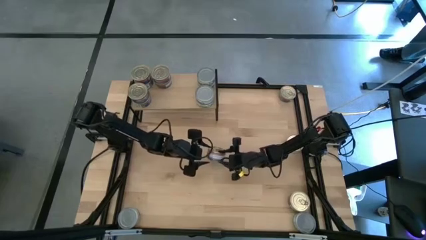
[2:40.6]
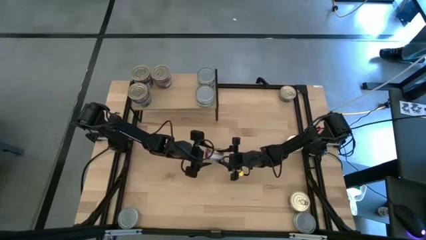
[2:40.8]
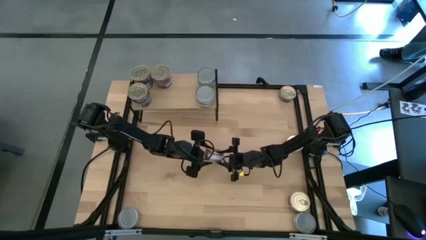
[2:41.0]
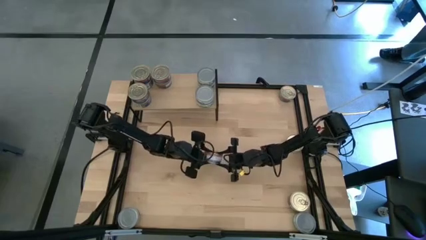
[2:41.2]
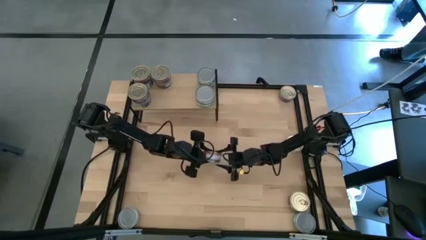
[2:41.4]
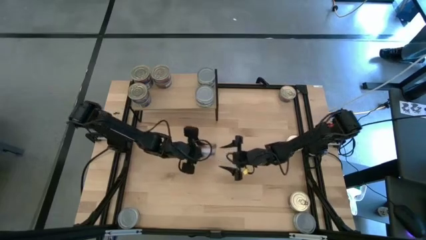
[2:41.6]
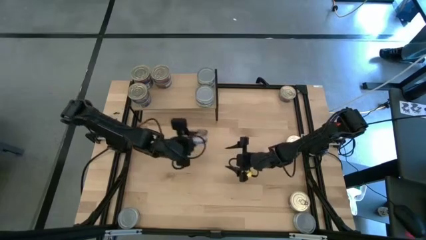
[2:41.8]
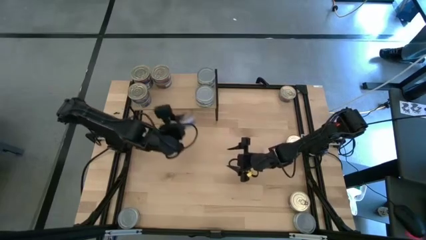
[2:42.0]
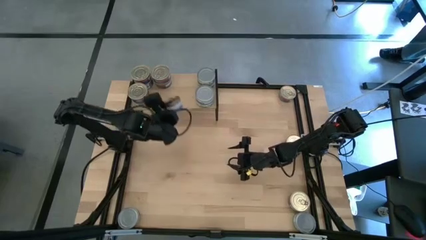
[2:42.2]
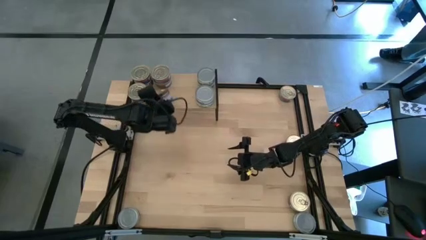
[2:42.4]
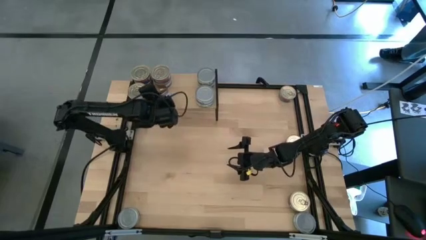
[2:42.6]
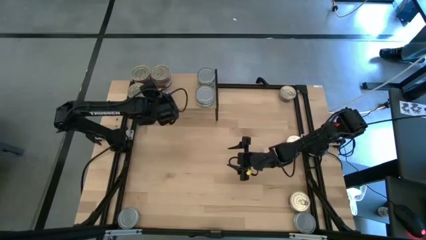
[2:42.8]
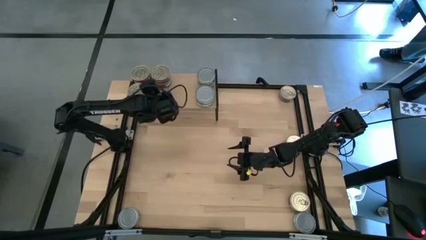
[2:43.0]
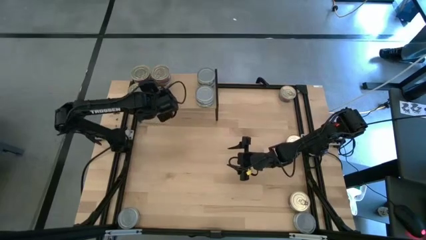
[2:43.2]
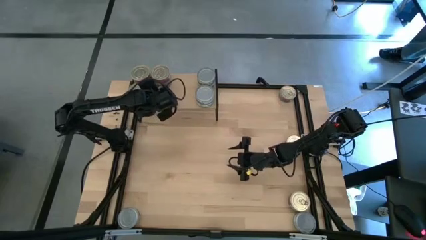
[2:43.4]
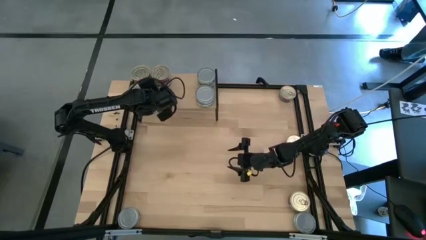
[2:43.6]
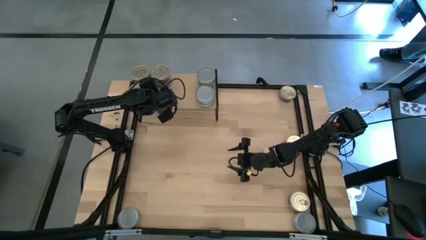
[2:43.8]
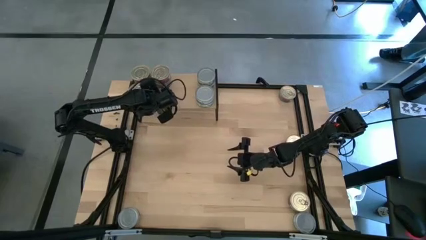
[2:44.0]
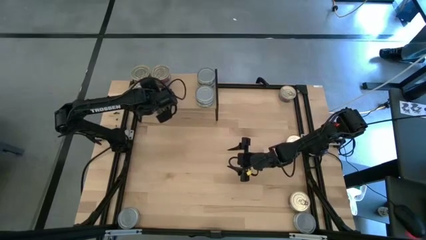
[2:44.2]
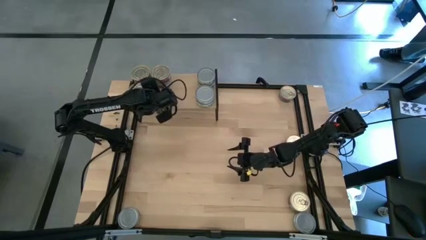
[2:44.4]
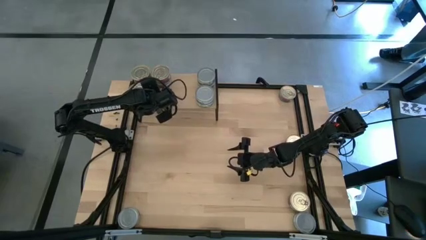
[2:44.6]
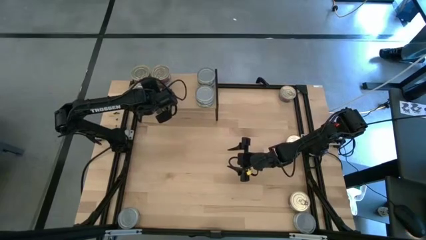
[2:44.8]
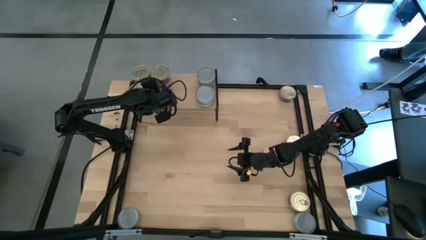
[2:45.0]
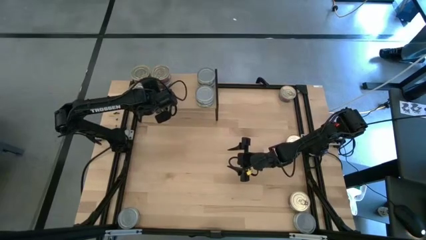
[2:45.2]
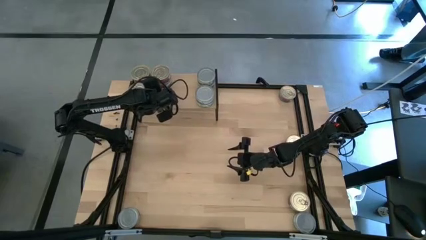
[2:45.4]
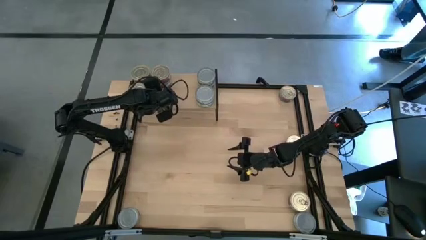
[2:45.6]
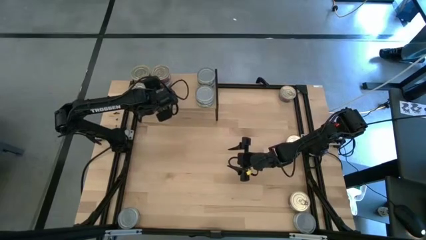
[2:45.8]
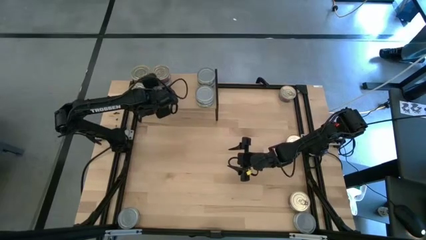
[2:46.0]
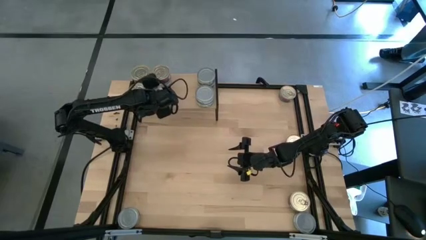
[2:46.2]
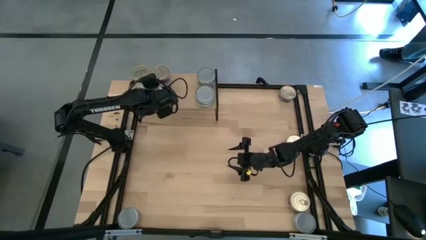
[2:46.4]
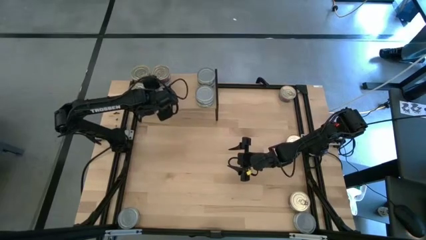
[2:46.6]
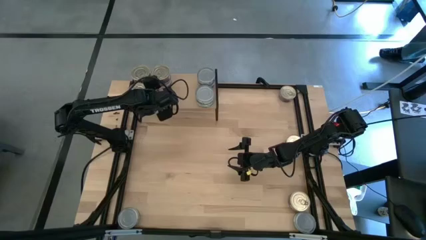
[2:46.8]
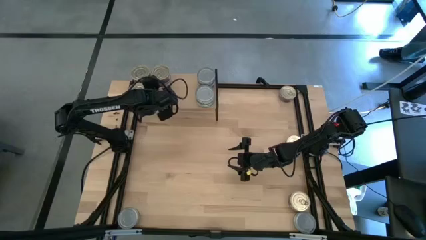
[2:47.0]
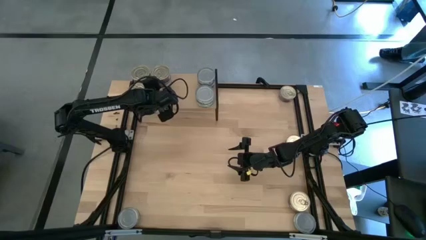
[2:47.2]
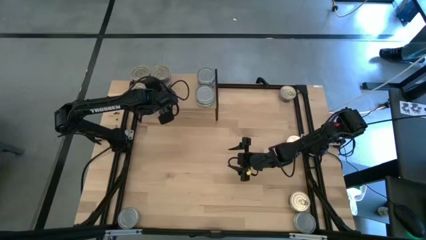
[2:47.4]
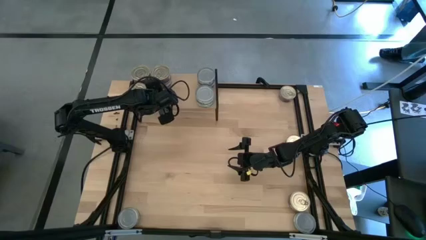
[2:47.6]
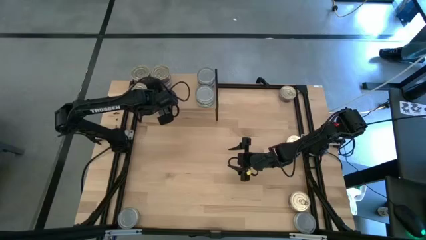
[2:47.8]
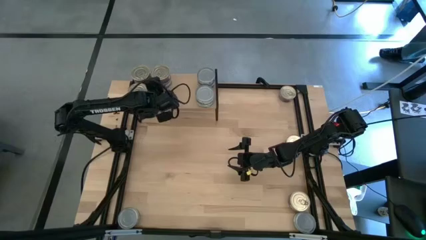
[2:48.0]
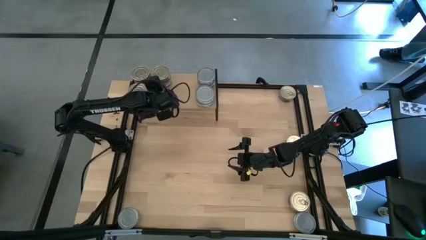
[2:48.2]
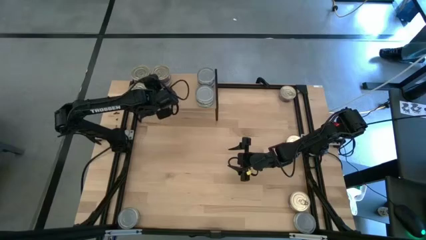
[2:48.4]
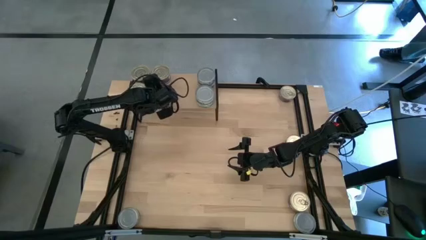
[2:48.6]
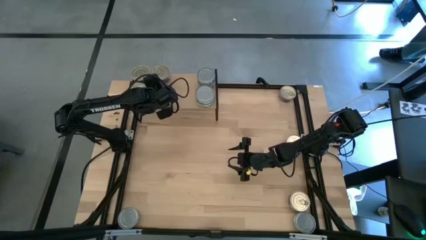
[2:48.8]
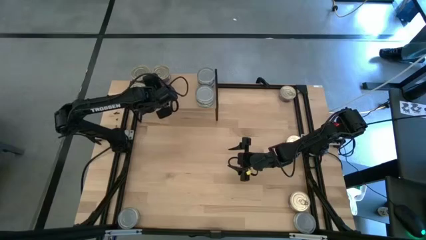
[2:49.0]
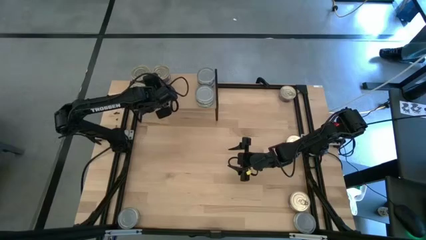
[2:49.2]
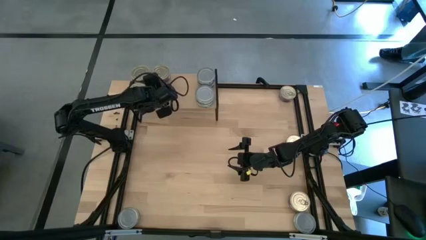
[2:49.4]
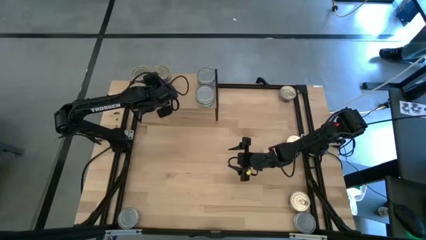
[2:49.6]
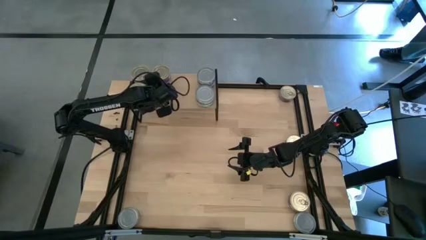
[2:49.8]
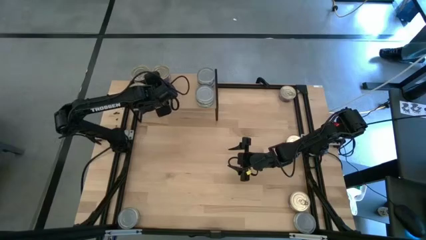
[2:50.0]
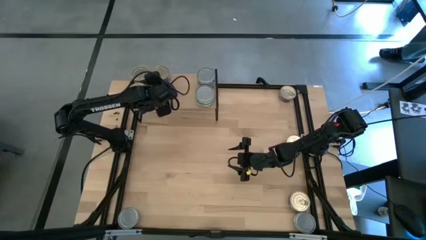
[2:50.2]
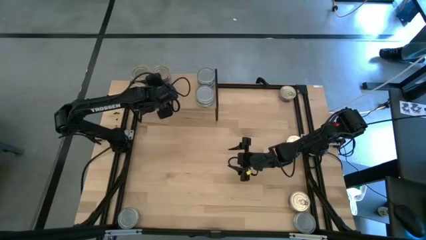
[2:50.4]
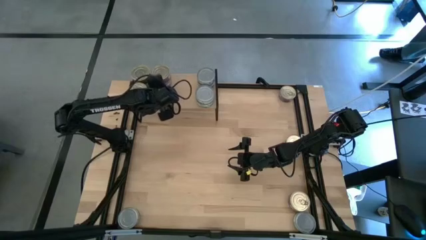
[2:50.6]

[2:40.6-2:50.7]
Task: Stack canned seafood by type on shelf
Put the blue tuna can on the shelf aligned with the other blue tuna can
